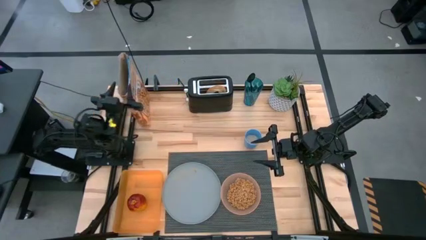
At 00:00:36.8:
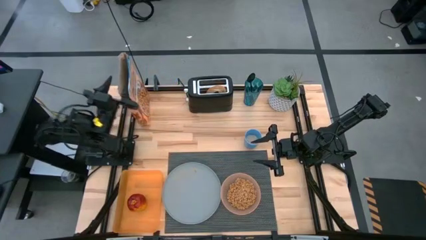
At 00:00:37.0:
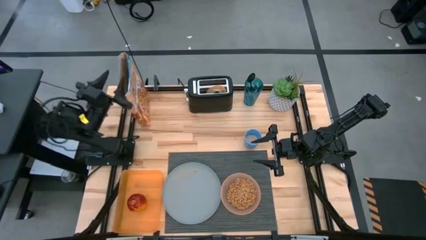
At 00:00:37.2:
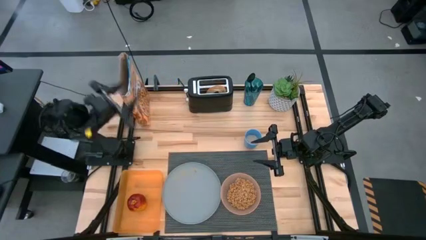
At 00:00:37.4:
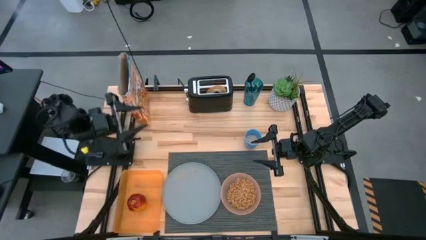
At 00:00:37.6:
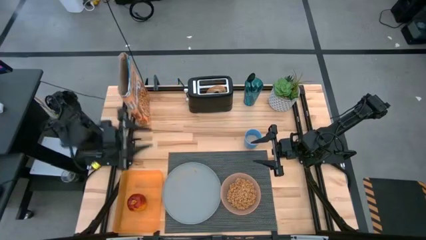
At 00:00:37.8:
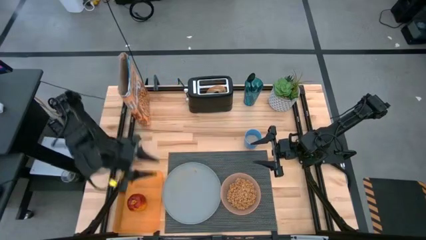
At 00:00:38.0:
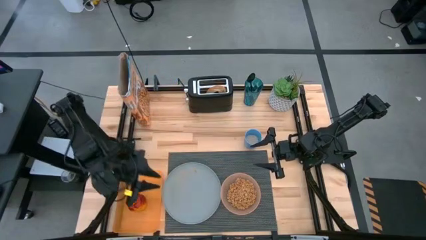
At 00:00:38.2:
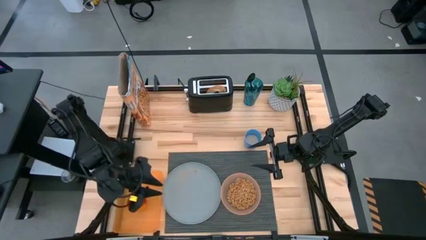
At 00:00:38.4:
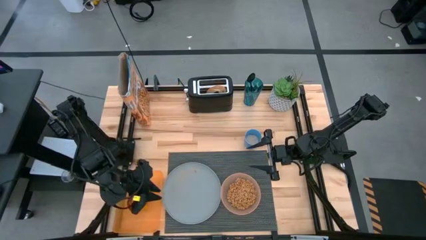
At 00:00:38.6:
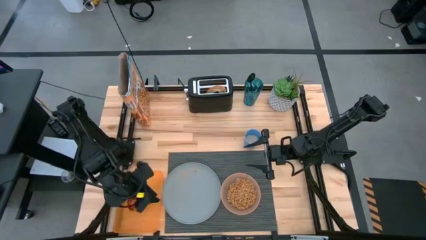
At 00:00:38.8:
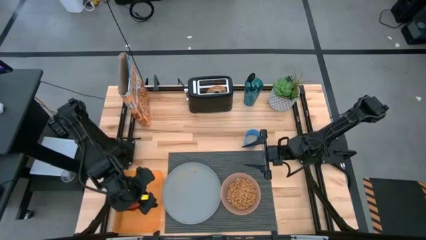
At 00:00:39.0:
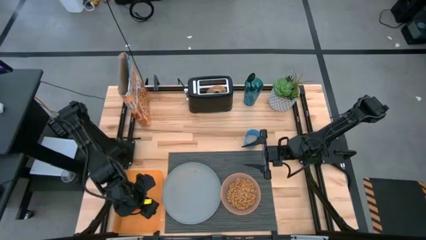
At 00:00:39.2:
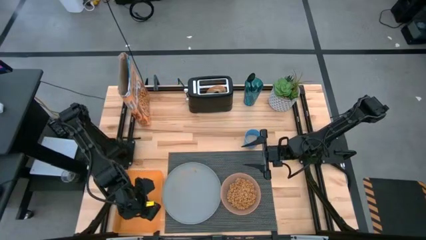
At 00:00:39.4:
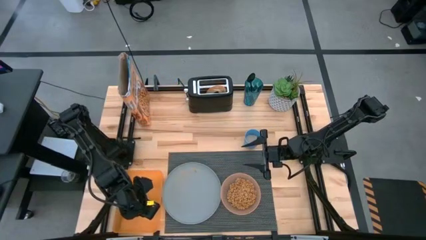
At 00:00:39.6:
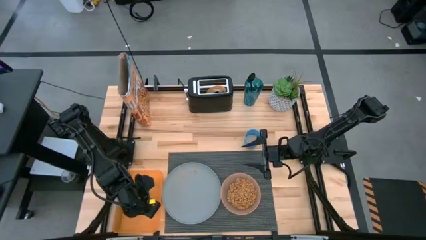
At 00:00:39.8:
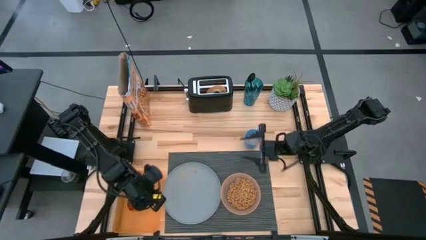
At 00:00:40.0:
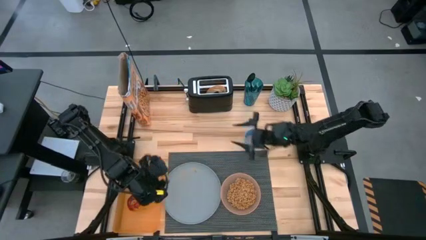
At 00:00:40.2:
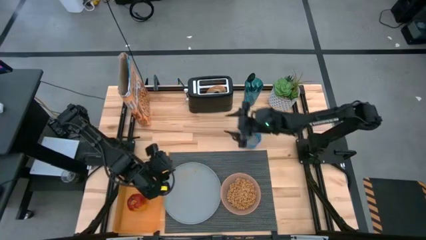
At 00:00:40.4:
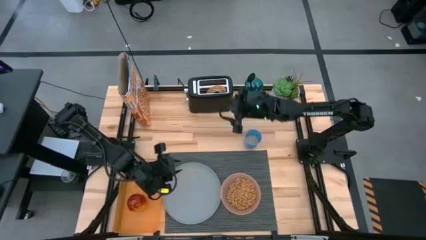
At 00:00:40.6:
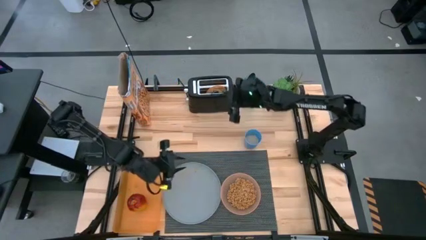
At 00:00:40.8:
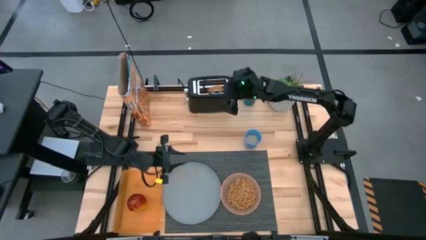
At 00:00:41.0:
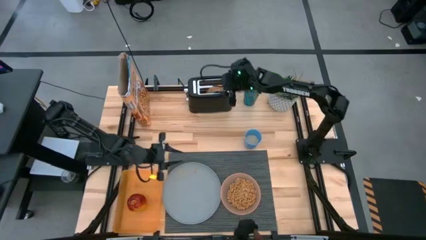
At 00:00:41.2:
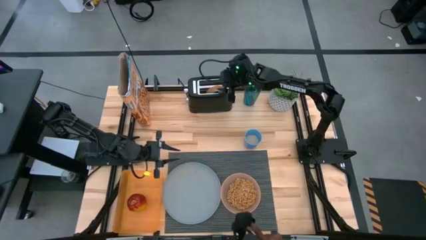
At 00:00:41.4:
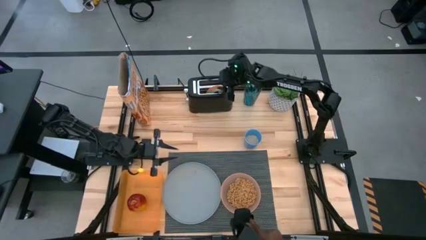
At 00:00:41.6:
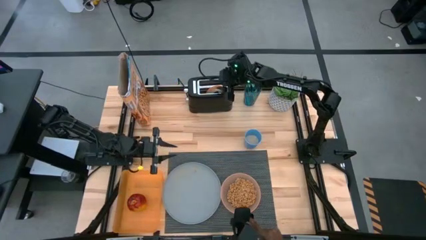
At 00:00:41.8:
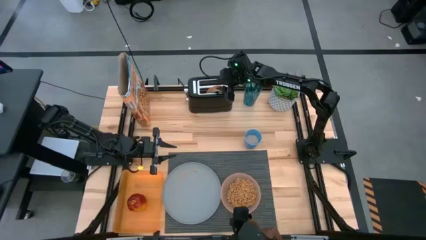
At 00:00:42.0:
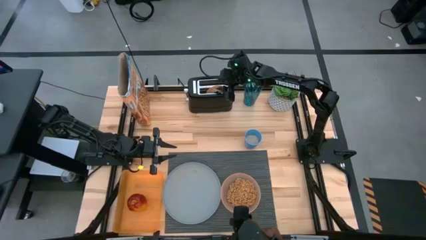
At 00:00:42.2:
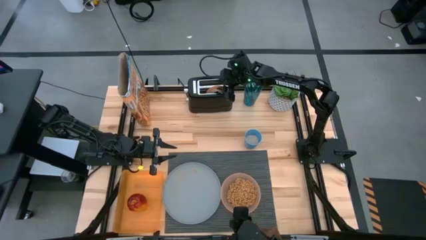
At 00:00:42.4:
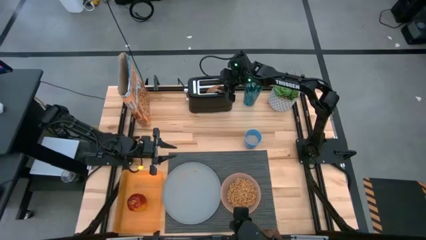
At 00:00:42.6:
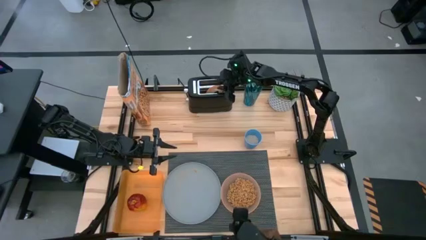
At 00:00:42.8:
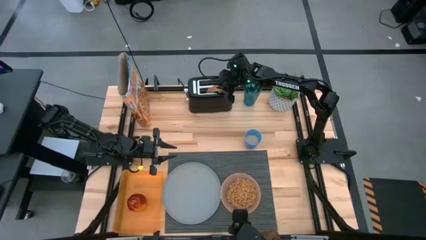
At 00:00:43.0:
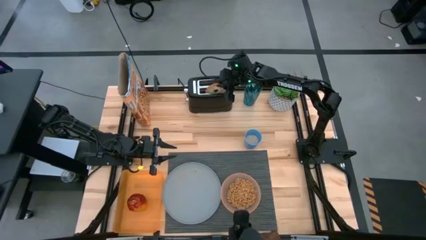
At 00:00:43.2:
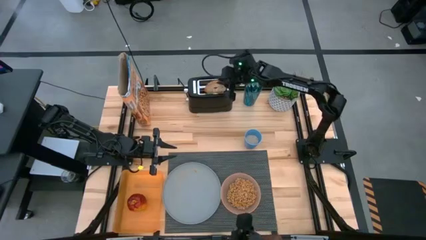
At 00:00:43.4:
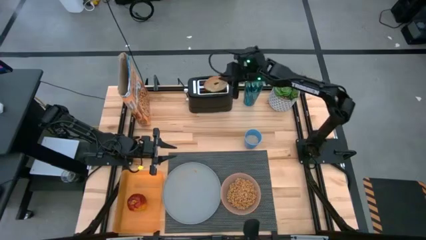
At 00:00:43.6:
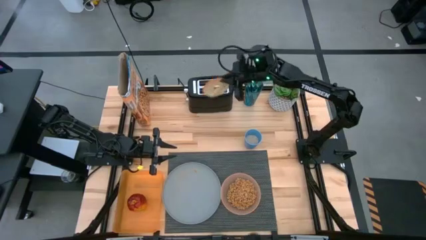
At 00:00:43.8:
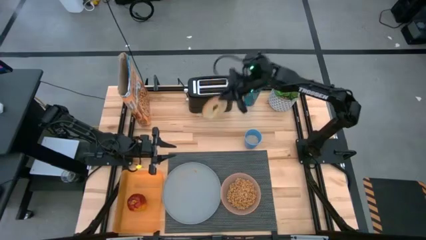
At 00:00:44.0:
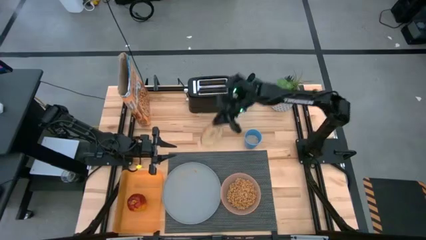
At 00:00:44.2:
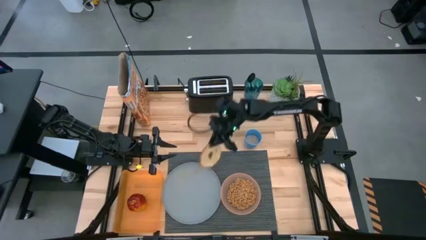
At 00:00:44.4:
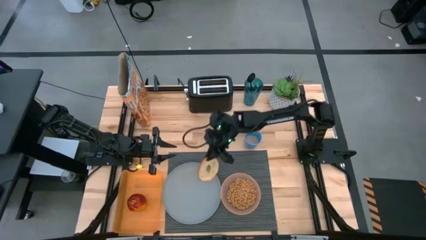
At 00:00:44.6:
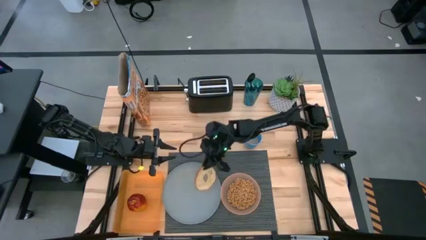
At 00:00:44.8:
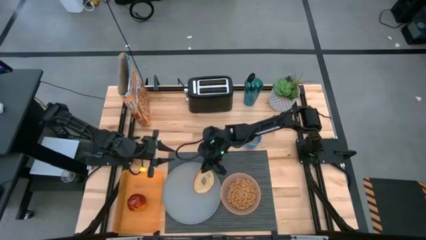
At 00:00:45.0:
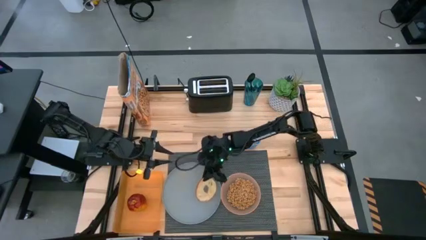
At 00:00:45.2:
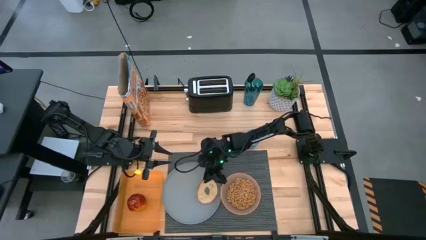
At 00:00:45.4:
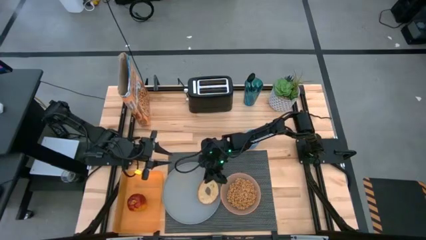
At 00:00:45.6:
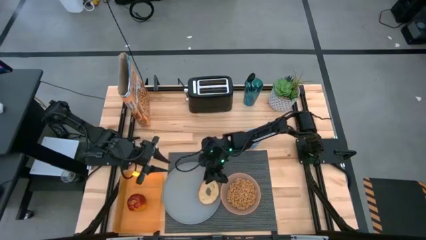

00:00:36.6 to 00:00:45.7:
Task: Arrange a breakfast setting
Put the sliced bread on the gray plate

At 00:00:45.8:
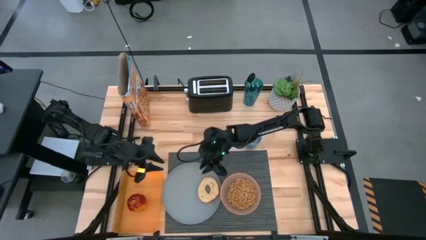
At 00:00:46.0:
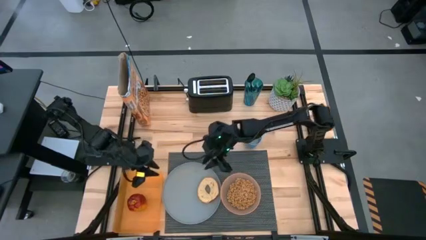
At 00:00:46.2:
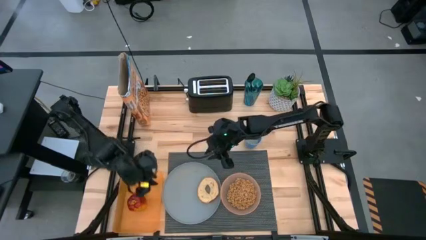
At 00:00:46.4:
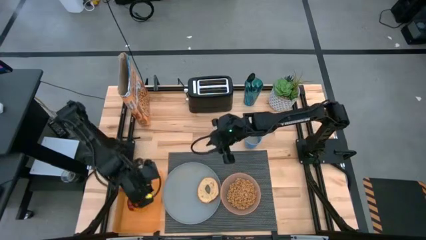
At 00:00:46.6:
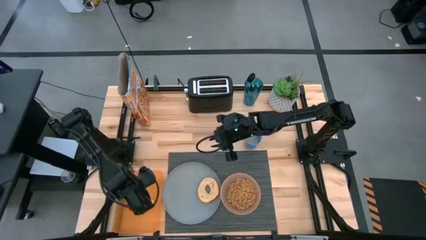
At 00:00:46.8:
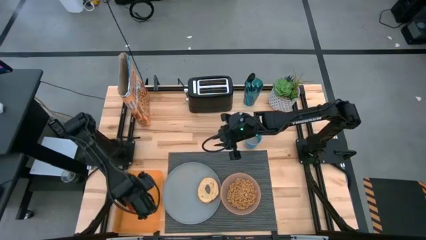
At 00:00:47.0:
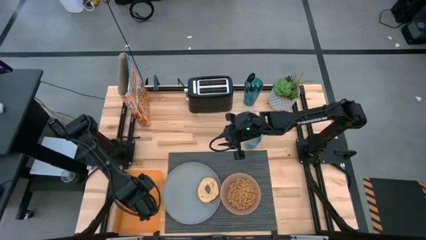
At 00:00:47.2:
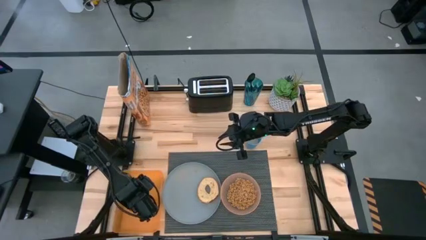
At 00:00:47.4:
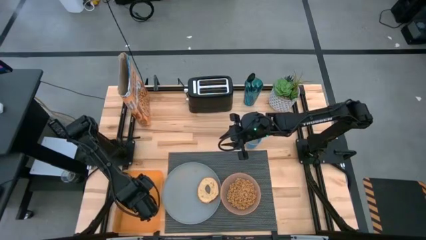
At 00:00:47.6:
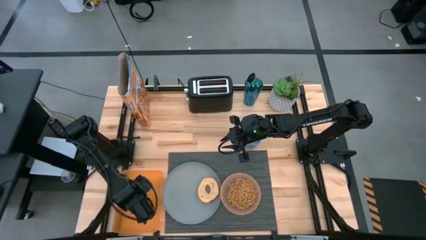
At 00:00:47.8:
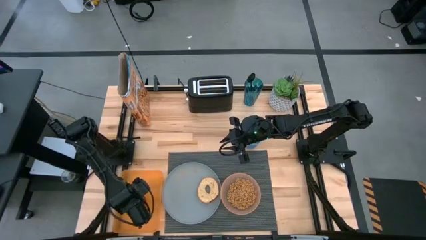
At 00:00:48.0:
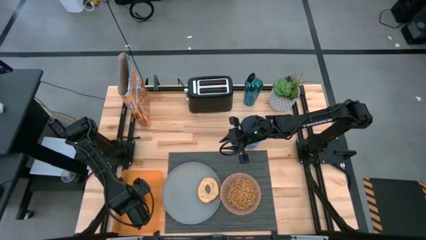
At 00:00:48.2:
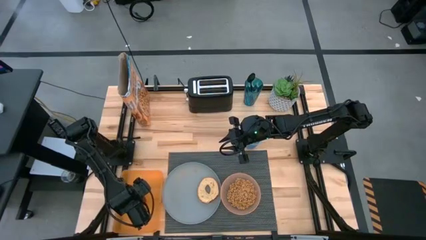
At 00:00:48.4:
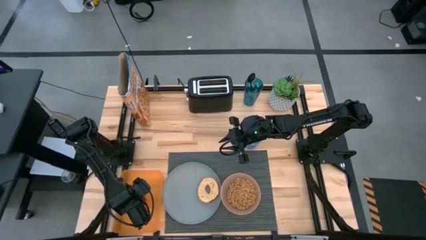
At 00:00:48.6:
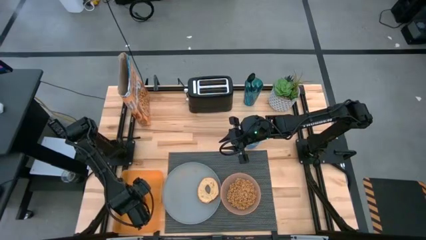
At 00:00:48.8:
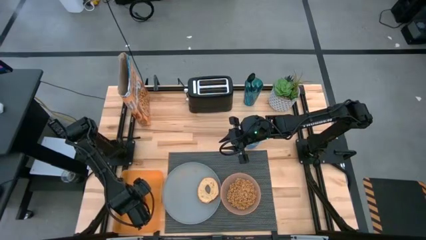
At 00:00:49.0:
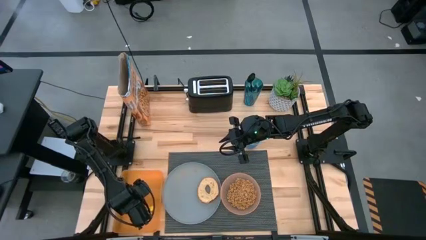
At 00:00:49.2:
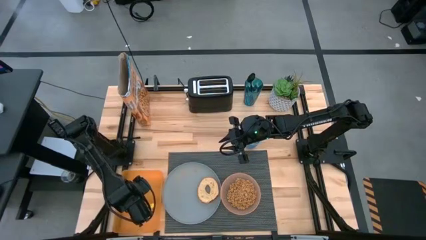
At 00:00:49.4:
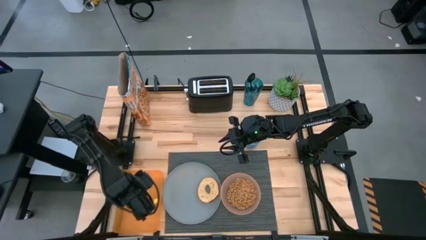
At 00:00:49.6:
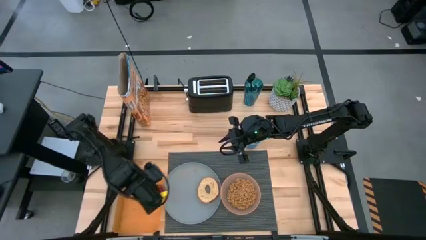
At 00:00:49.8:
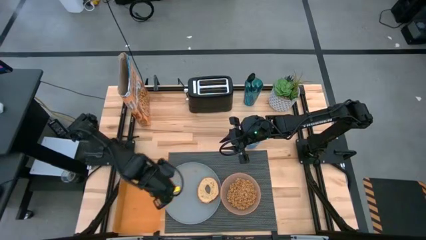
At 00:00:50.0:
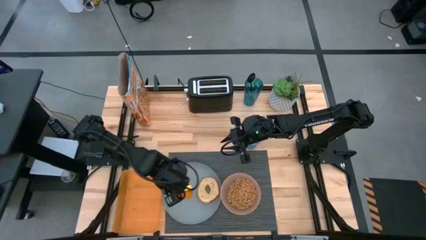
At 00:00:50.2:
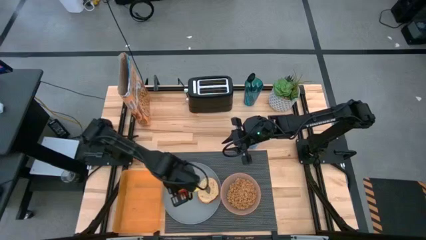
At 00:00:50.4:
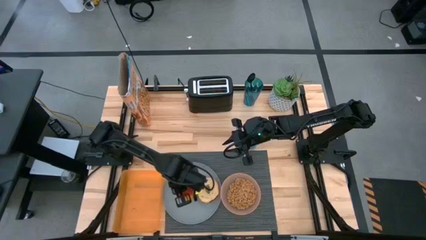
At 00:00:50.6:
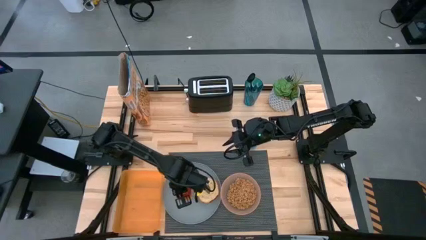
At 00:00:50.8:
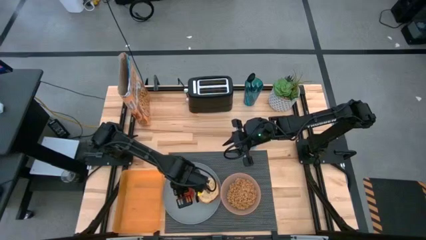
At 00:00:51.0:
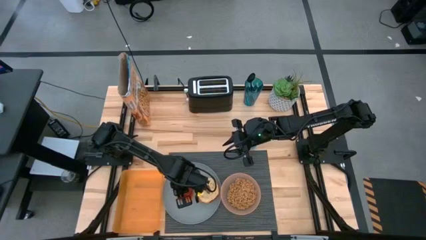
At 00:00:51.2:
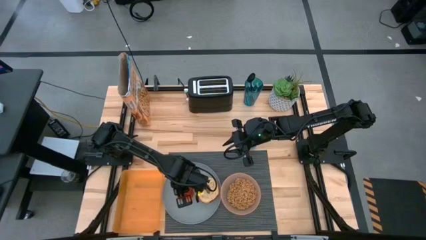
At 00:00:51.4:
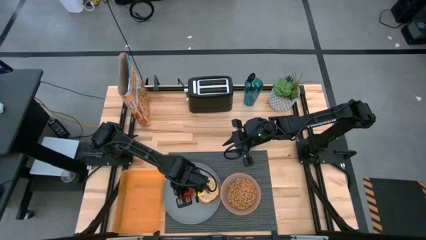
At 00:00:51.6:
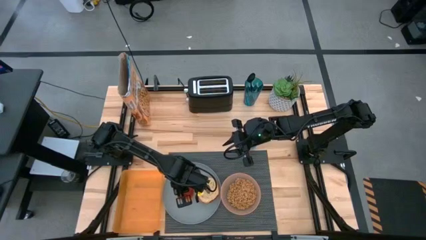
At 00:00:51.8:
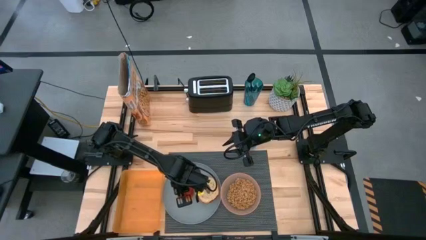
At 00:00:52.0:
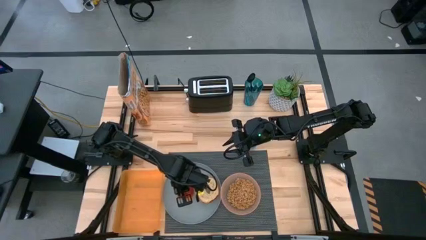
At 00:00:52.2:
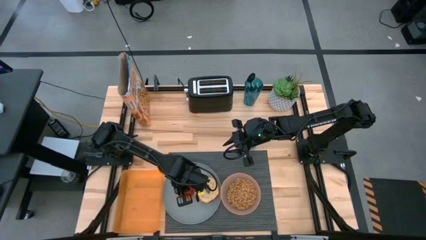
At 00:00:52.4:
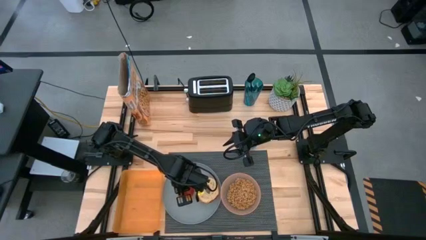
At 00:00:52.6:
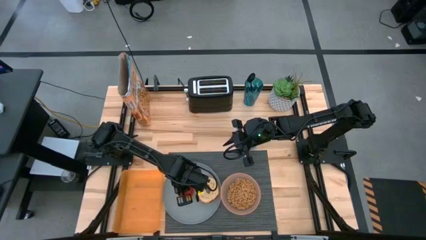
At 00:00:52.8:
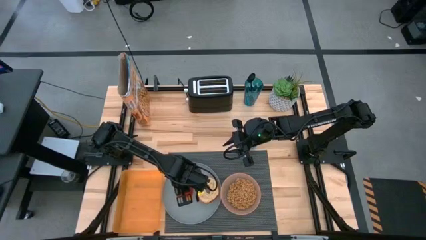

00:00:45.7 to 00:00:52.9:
Put the red apple on the gray plate
